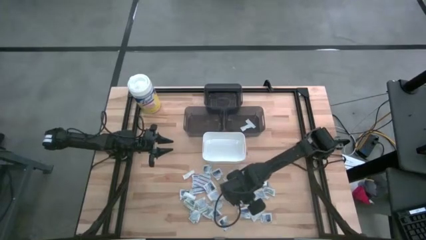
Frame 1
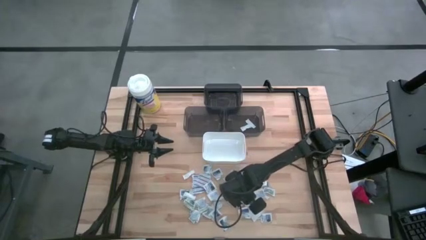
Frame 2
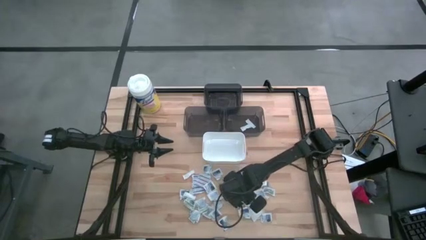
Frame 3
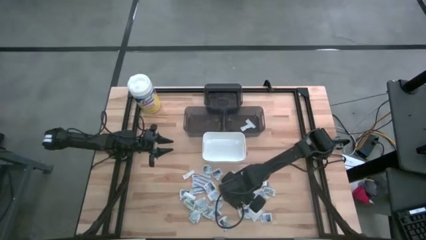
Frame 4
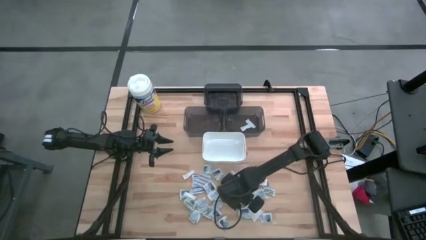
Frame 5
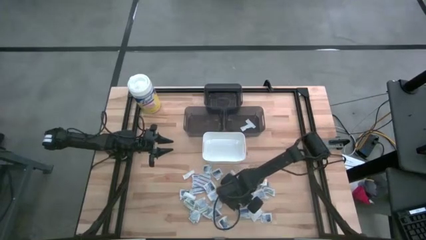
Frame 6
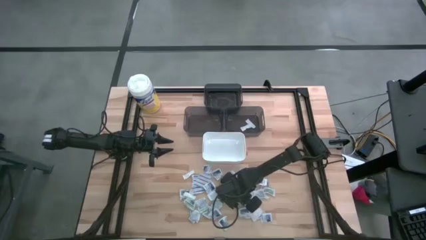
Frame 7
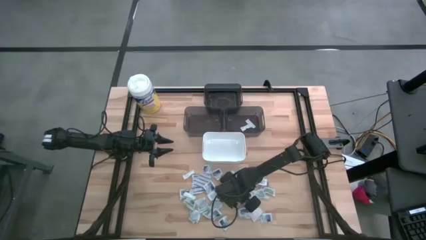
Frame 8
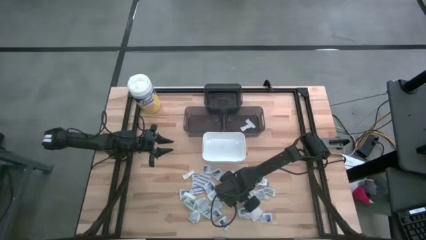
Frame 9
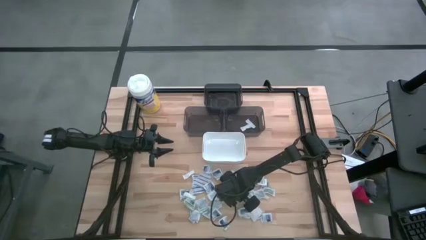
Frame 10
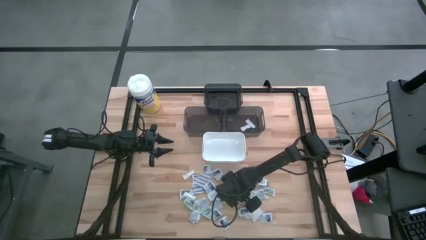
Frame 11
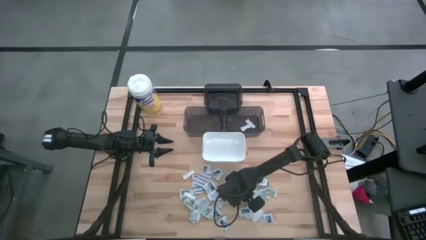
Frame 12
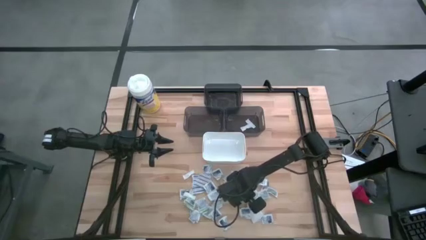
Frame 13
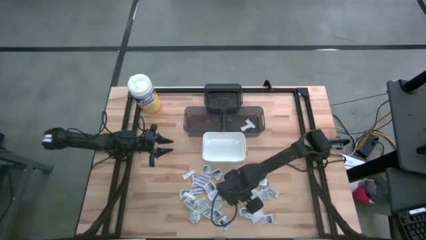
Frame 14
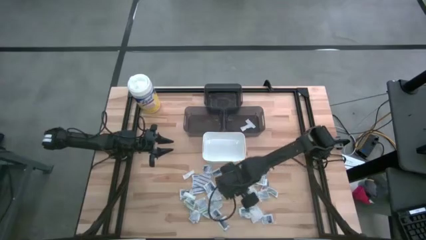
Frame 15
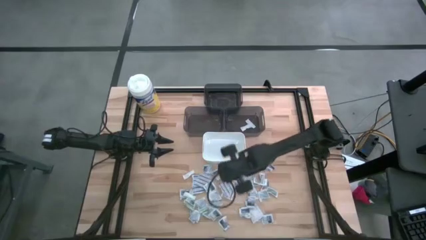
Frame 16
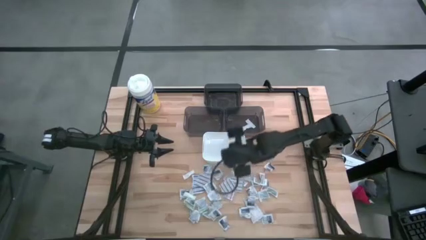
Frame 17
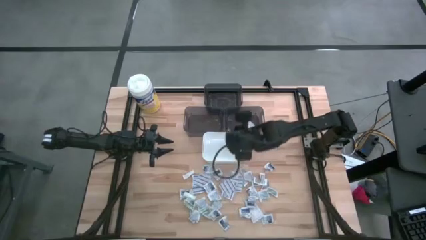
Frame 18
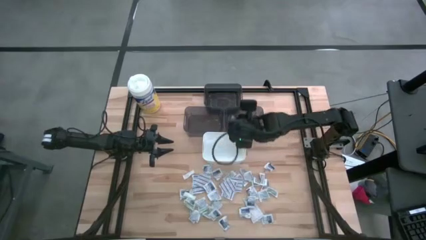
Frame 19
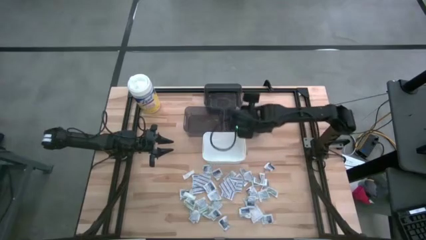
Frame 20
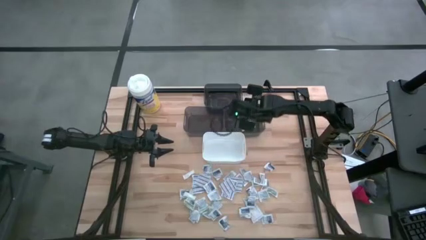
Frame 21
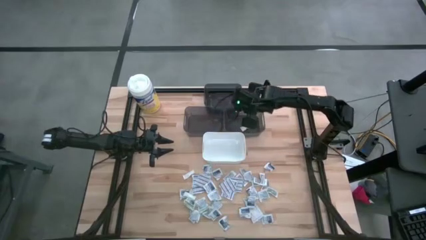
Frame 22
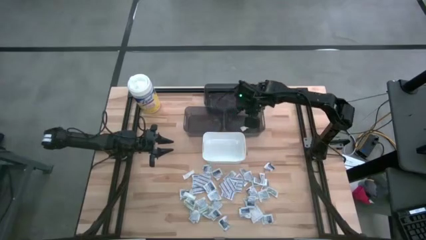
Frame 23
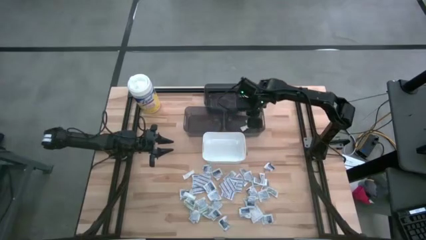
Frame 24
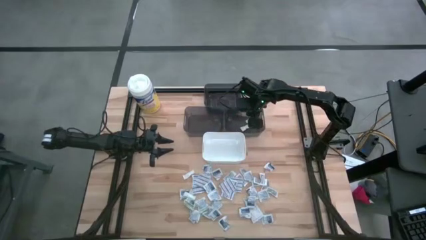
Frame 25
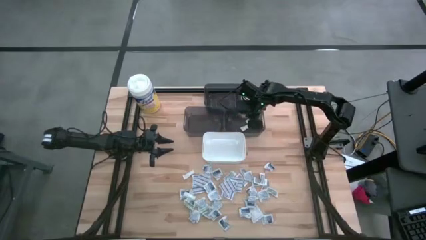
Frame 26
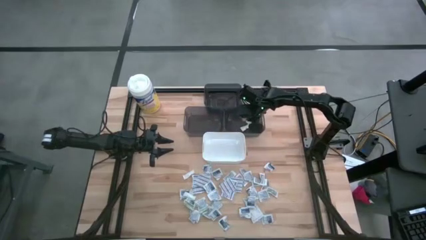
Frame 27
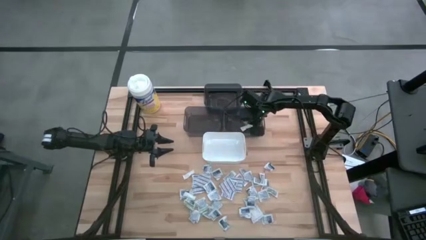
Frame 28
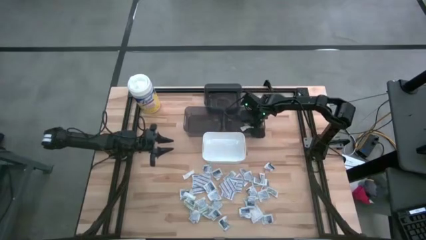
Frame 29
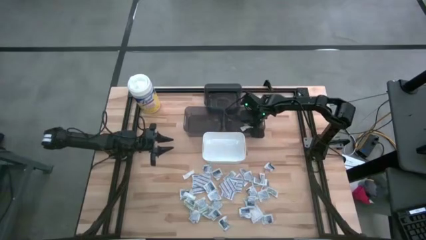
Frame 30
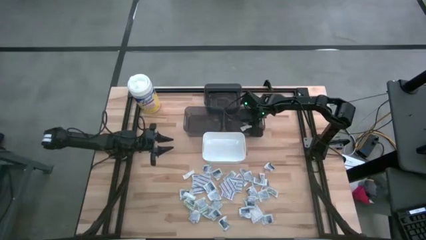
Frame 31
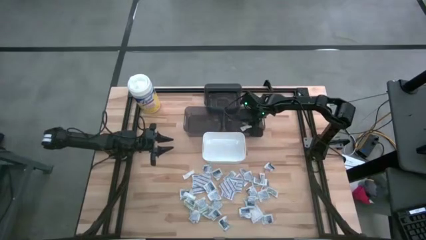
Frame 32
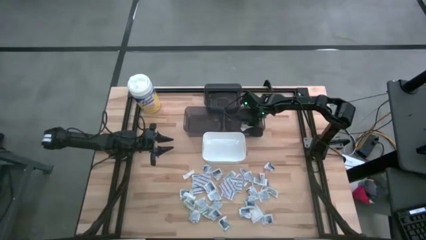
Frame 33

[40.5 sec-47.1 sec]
Task: Pick & Place First Aid Supplies
Put the green bandage into the bottom right black bin

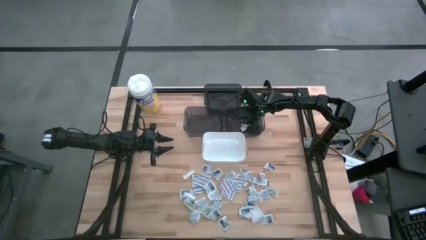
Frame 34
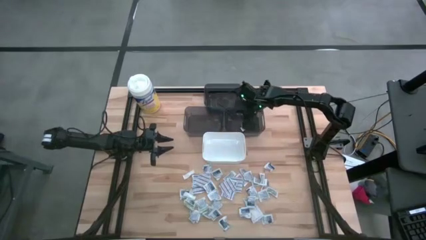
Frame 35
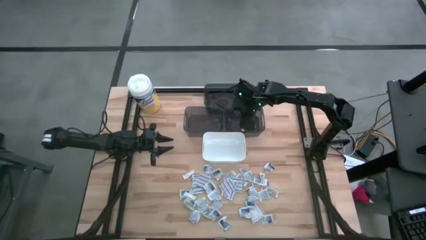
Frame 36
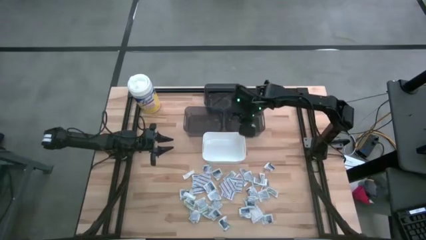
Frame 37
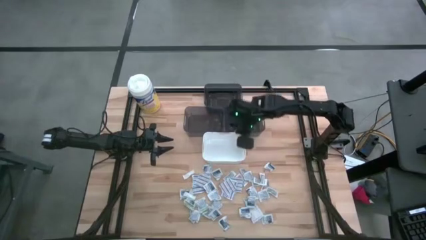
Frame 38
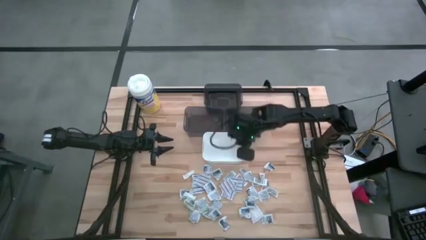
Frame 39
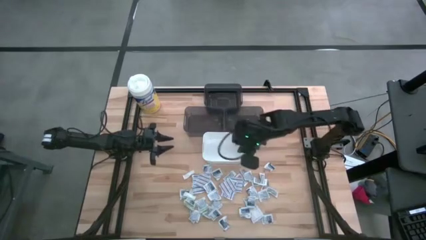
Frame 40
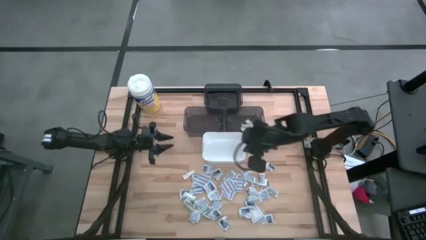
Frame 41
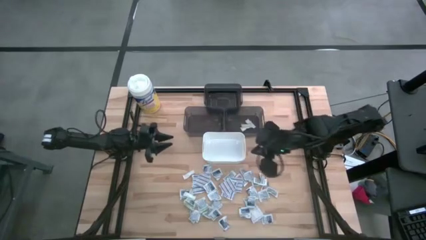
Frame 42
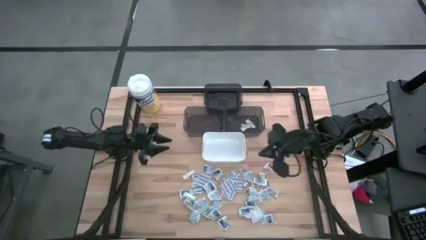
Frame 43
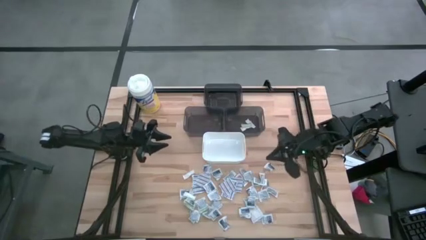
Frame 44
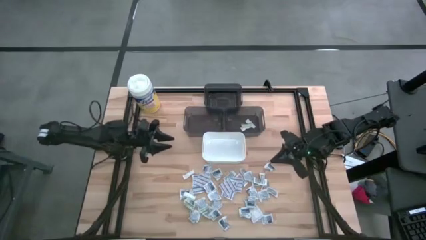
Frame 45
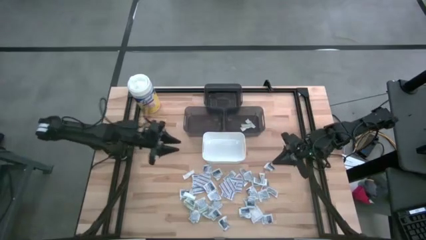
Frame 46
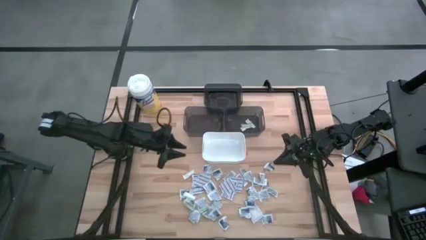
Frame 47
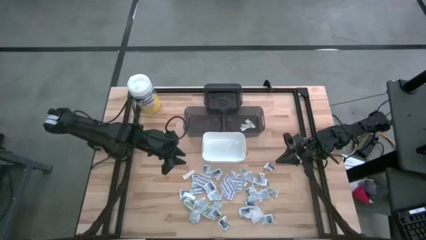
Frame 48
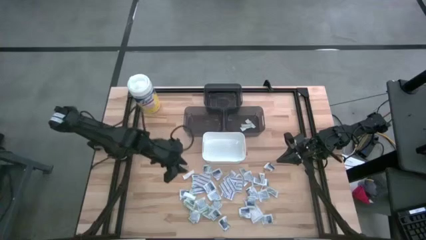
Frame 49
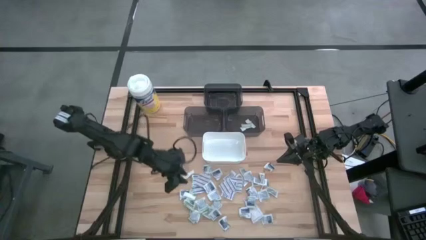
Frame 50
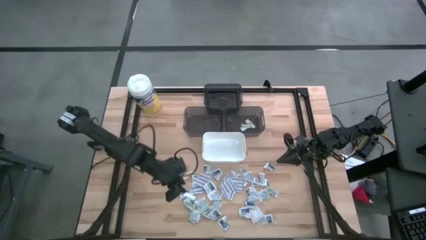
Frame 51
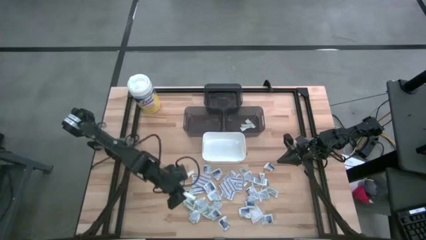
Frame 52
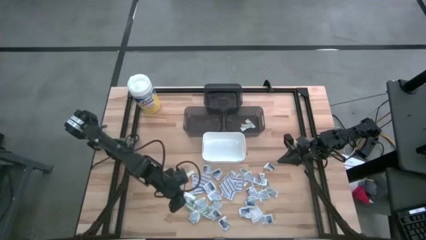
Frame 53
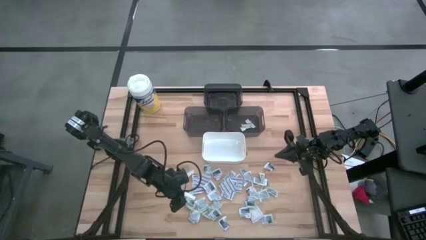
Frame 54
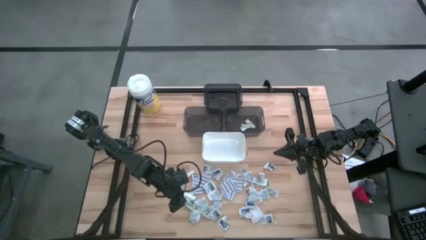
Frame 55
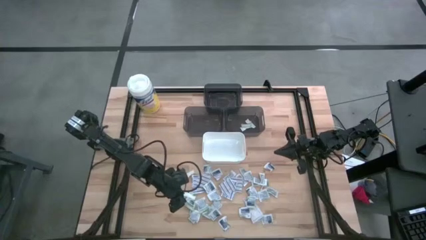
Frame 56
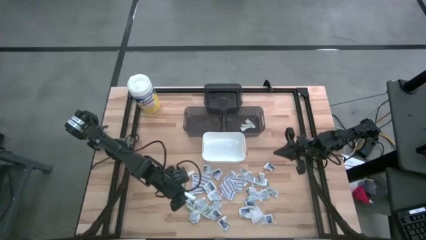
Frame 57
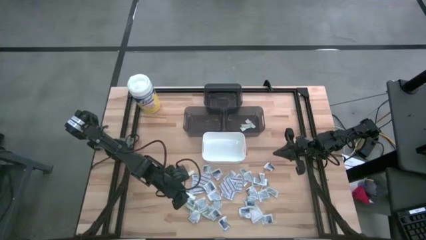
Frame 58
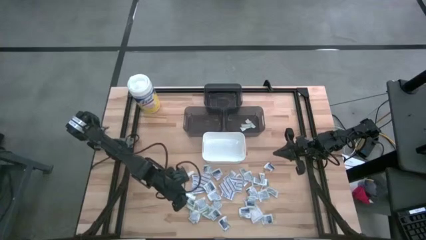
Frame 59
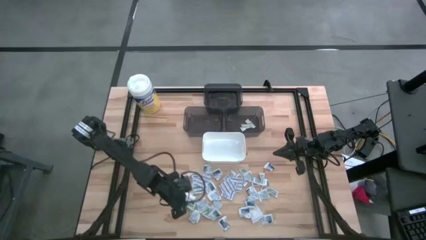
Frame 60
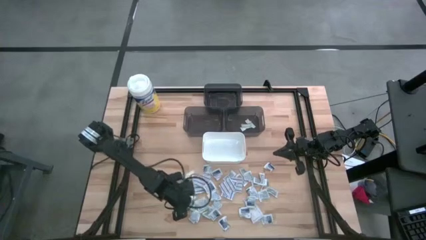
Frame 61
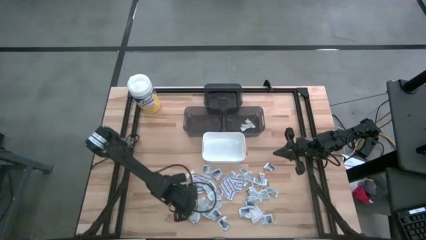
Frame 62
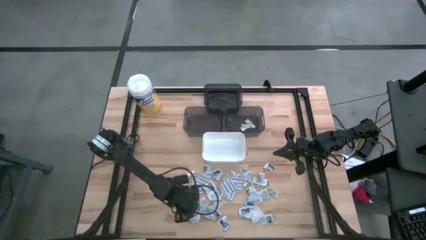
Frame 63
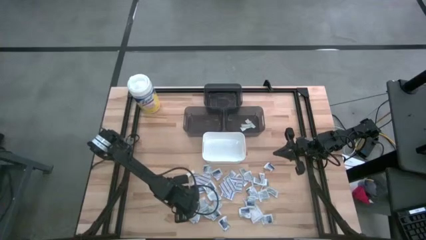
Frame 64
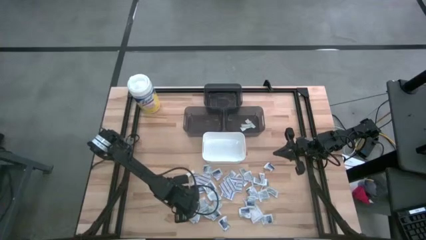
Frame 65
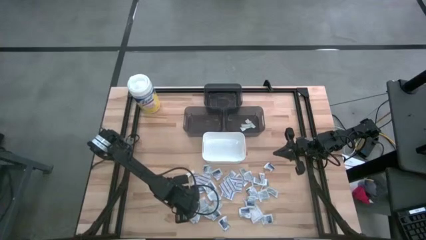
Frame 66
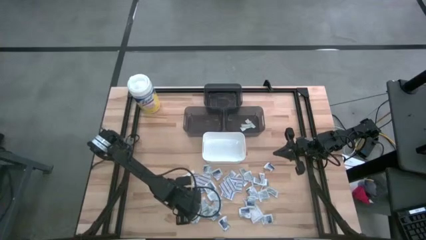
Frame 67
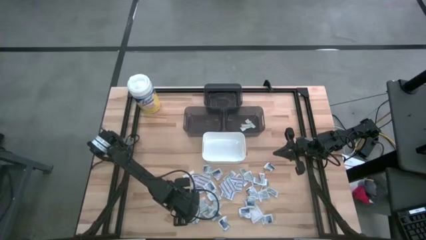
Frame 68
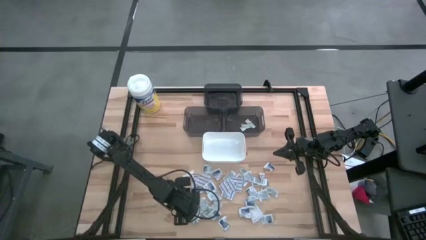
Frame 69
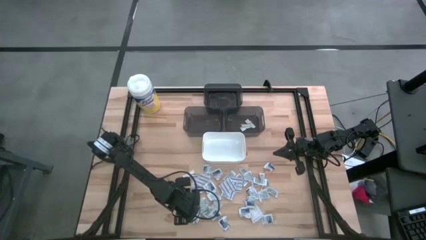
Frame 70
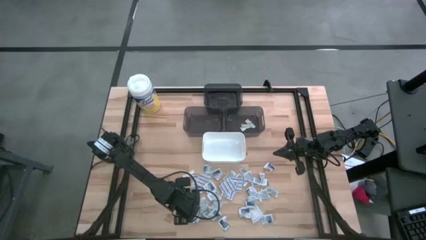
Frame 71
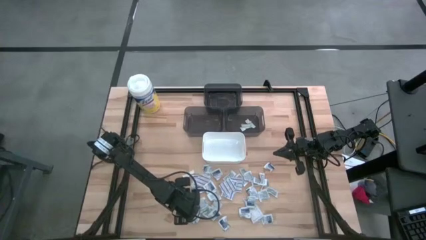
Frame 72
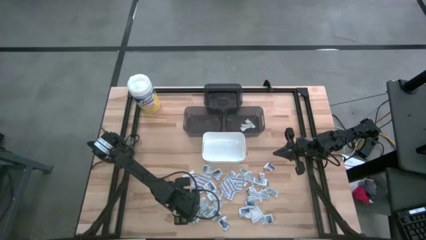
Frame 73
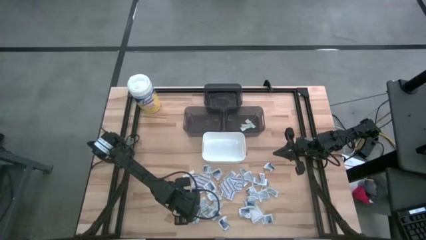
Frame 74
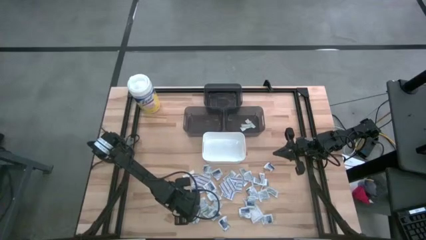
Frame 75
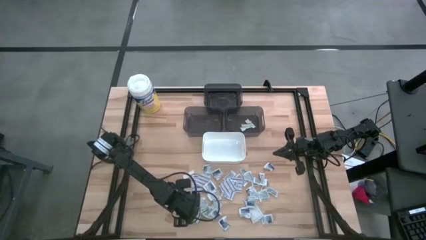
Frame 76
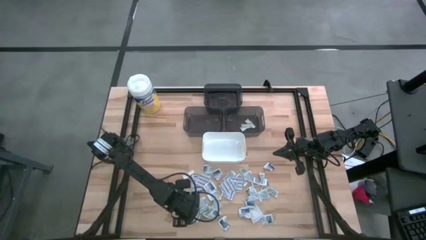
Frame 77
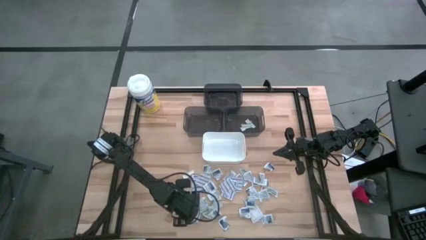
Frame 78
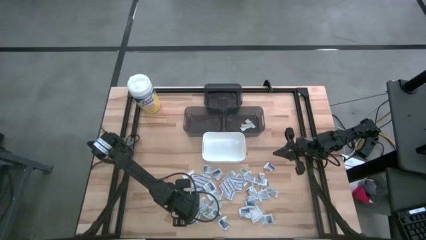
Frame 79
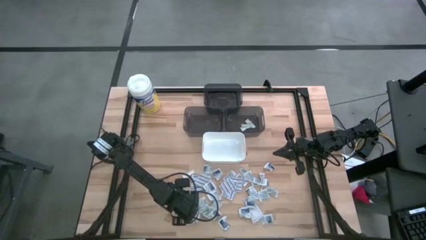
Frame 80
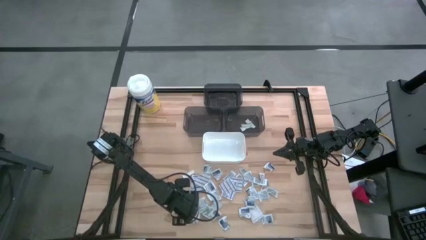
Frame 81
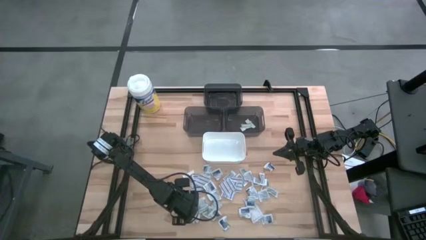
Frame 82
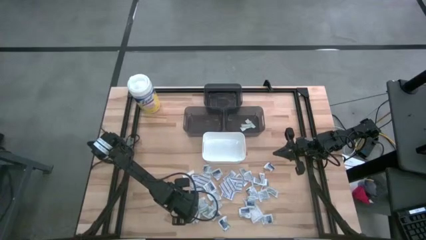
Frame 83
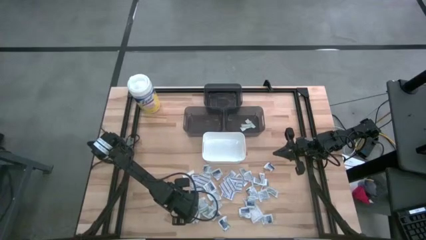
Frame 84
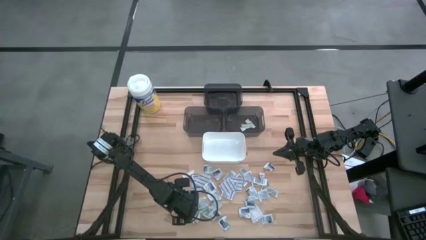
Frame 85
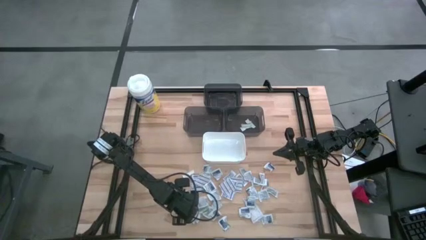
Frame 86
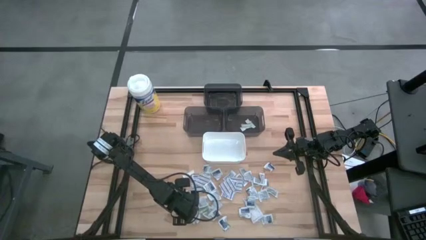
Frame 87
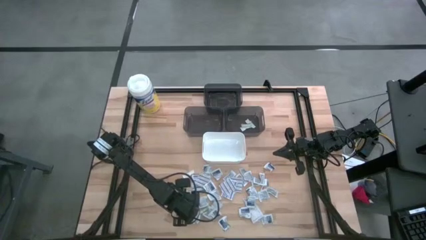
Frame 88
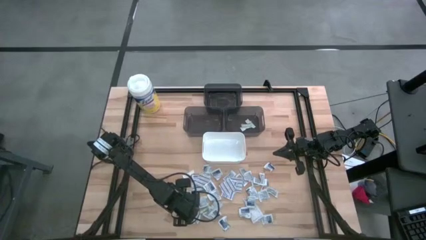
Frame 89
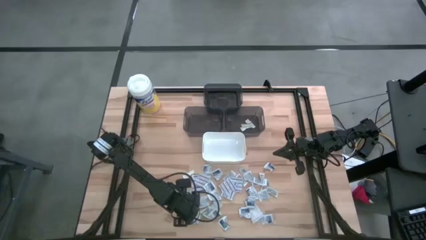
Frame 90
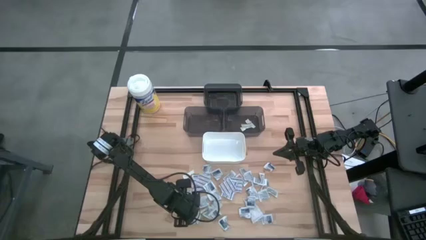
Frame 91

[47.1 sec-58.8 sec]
Put the green bandage into the bottom right black bin
